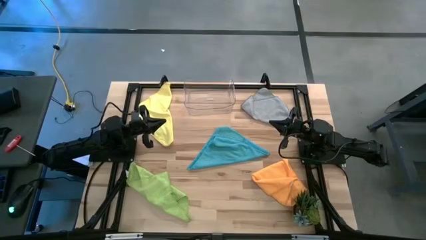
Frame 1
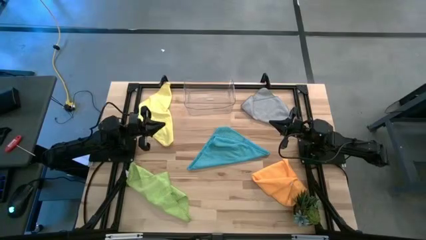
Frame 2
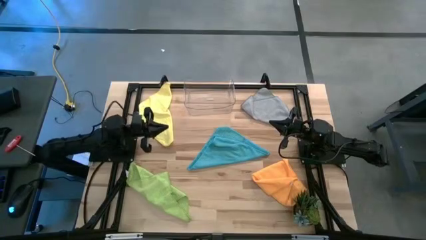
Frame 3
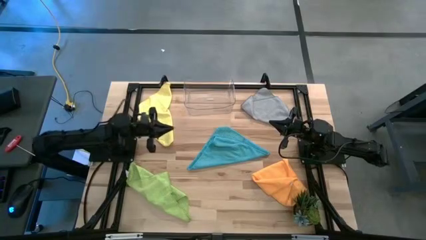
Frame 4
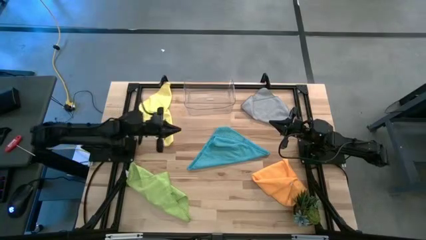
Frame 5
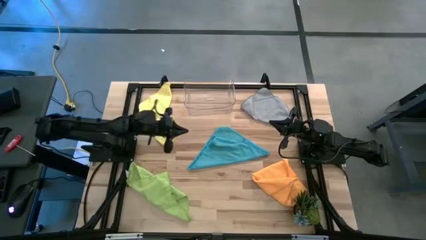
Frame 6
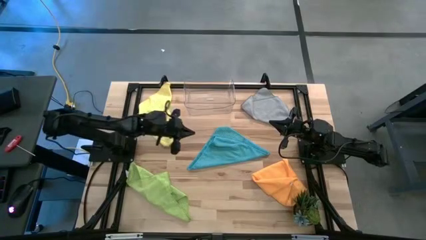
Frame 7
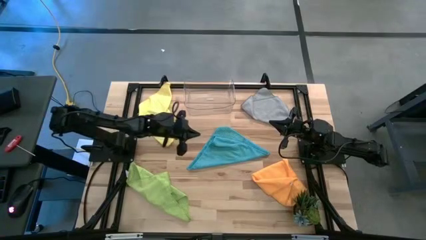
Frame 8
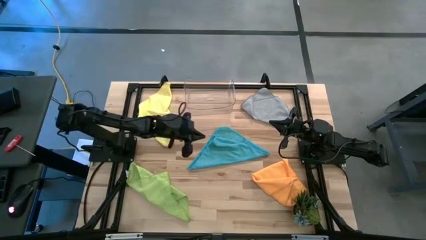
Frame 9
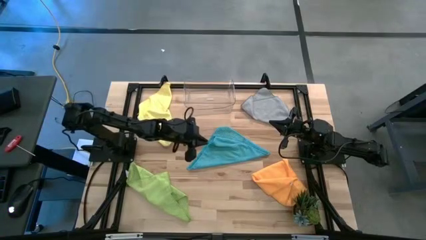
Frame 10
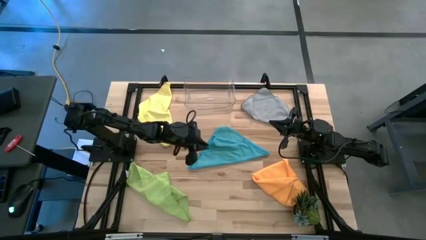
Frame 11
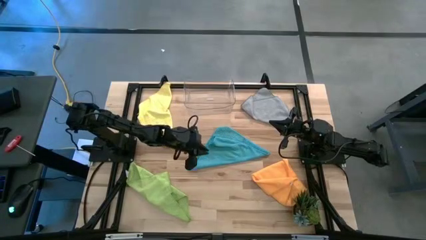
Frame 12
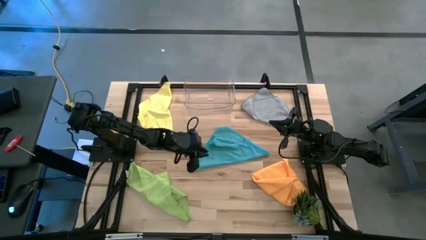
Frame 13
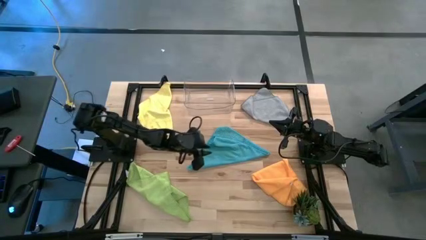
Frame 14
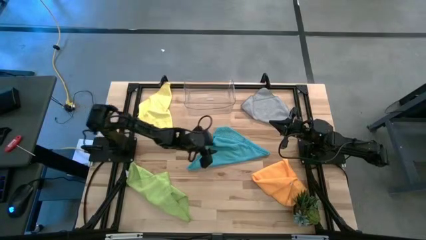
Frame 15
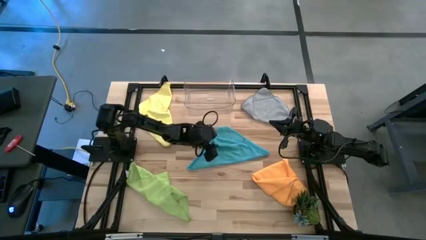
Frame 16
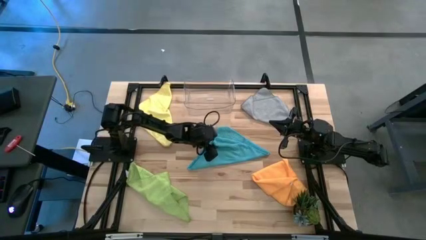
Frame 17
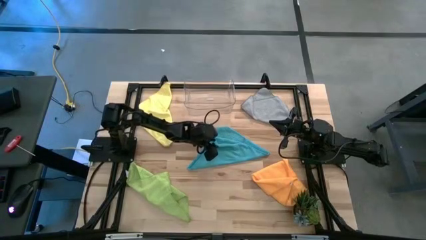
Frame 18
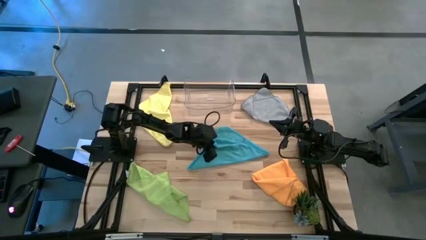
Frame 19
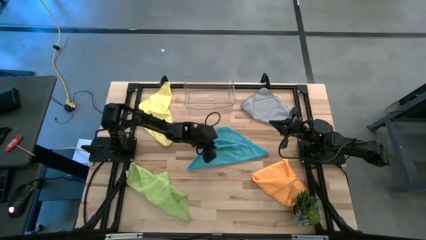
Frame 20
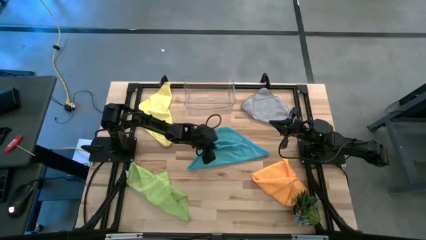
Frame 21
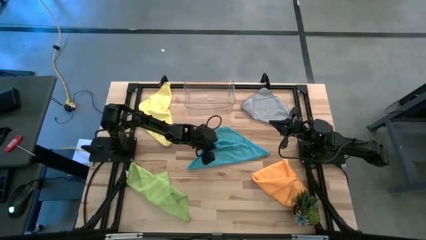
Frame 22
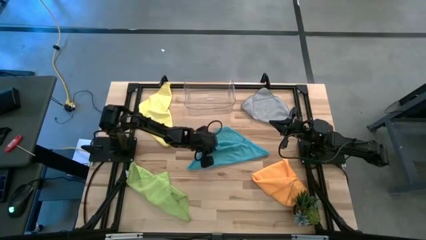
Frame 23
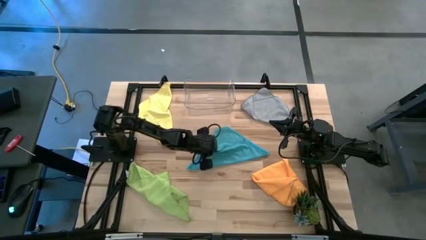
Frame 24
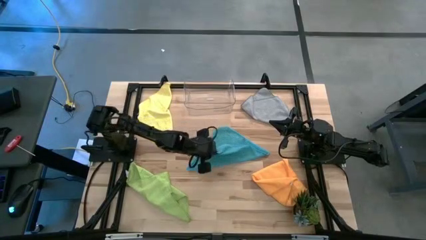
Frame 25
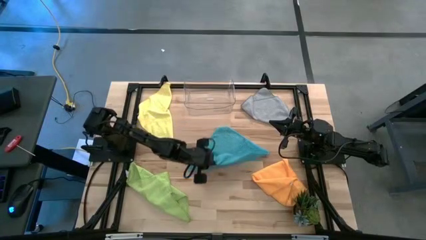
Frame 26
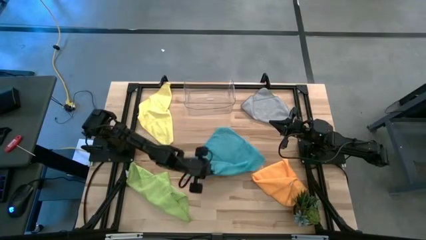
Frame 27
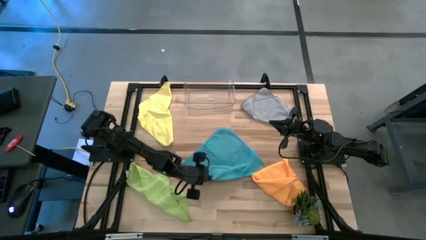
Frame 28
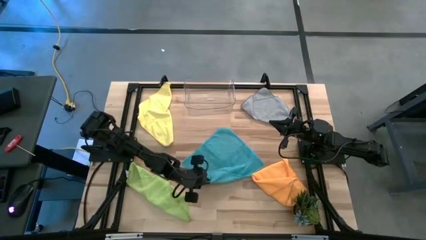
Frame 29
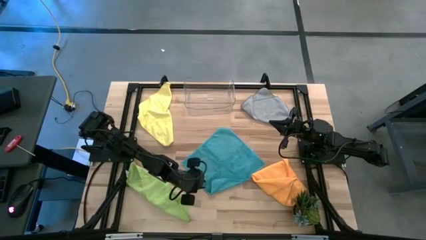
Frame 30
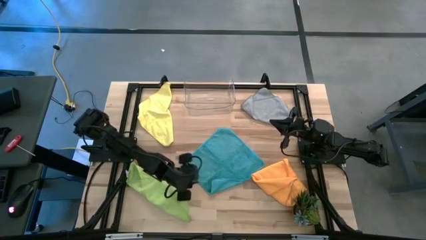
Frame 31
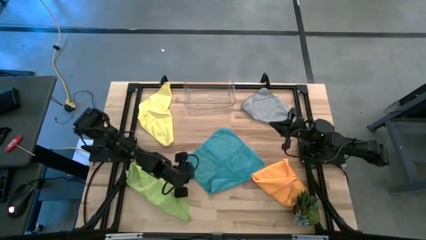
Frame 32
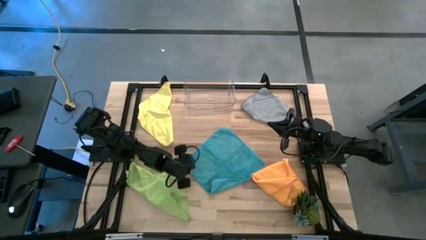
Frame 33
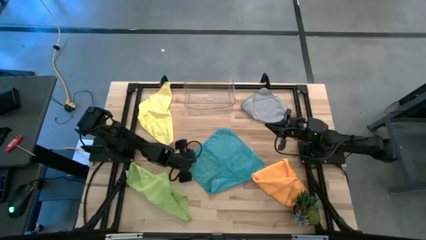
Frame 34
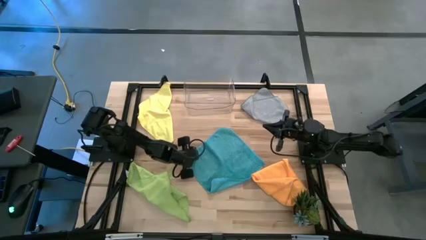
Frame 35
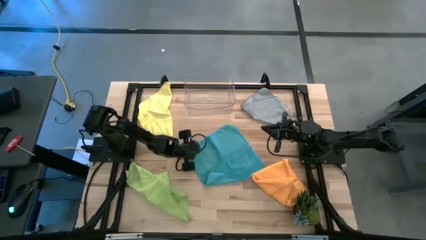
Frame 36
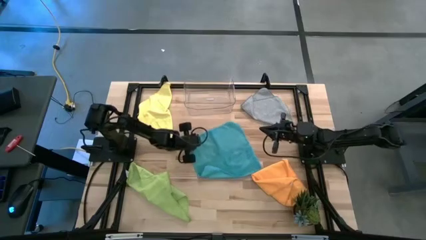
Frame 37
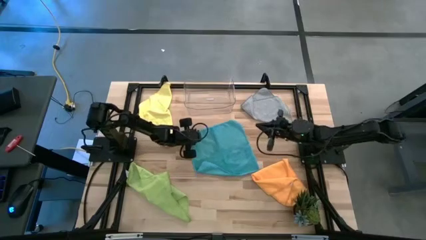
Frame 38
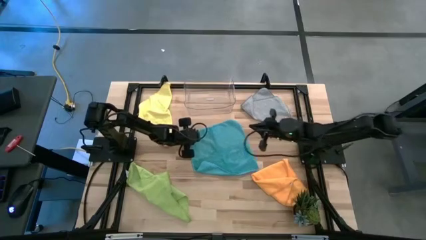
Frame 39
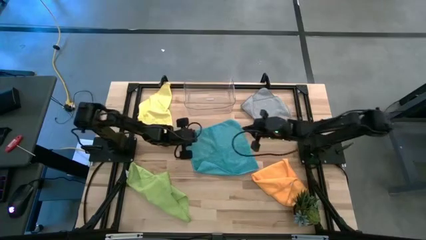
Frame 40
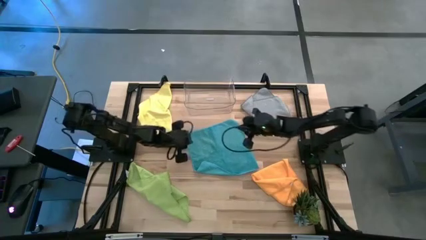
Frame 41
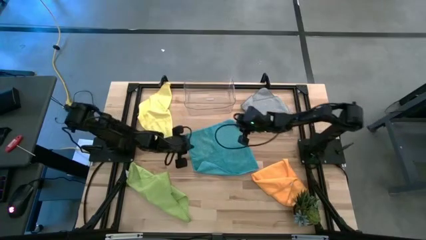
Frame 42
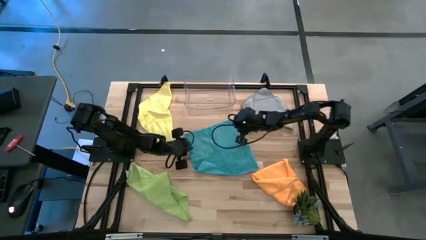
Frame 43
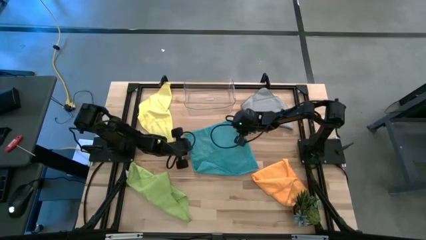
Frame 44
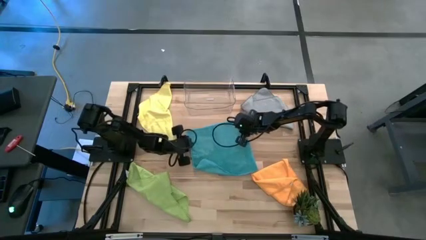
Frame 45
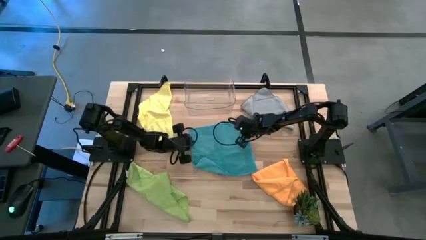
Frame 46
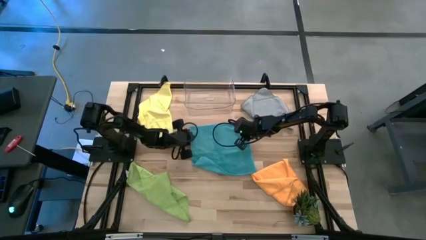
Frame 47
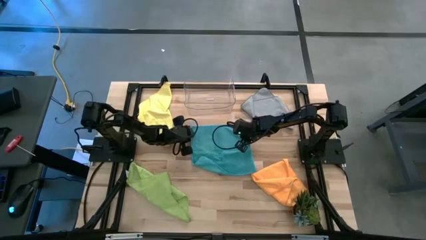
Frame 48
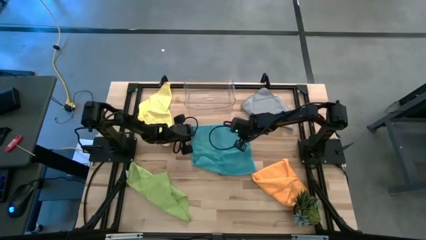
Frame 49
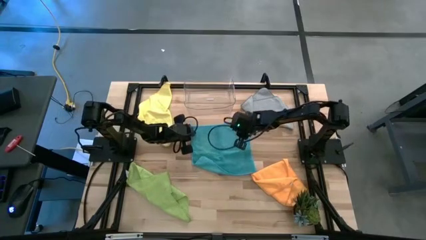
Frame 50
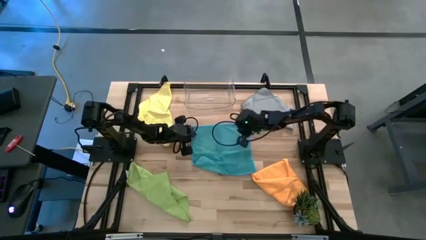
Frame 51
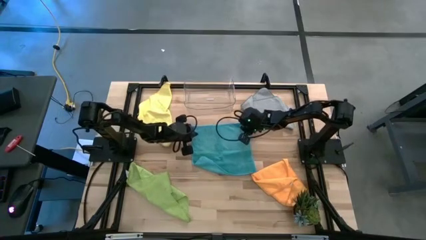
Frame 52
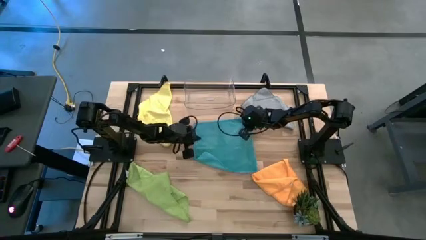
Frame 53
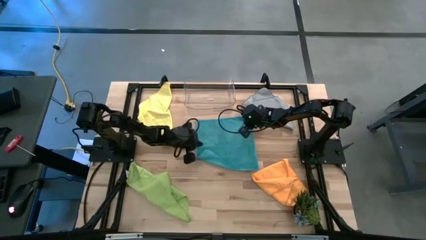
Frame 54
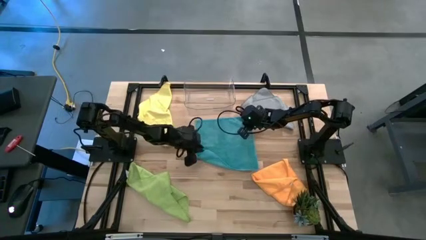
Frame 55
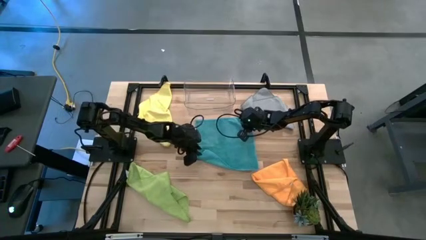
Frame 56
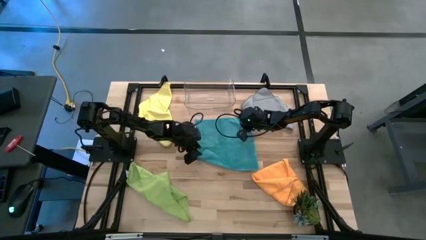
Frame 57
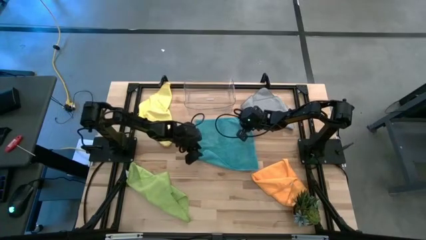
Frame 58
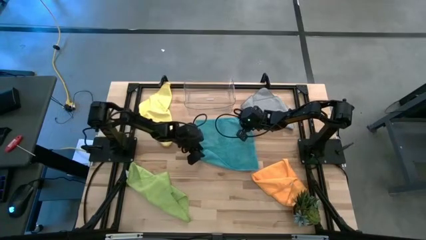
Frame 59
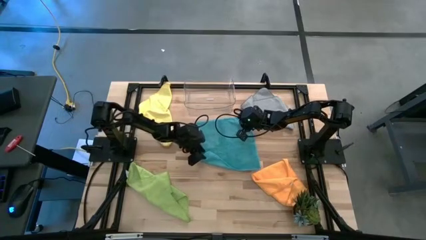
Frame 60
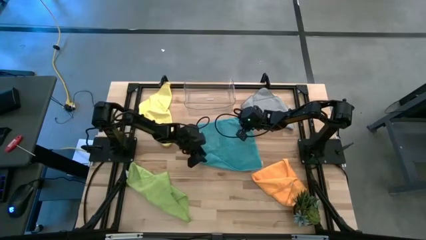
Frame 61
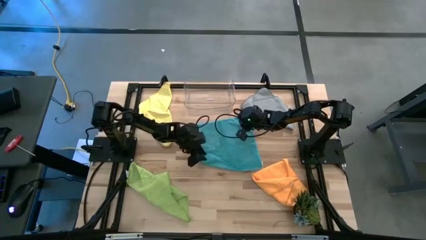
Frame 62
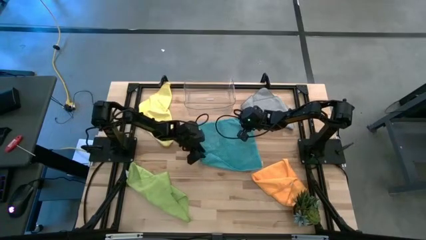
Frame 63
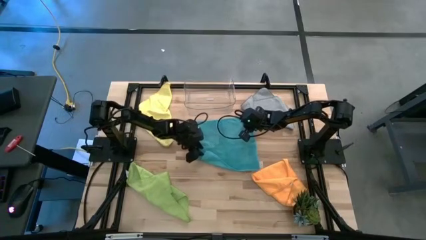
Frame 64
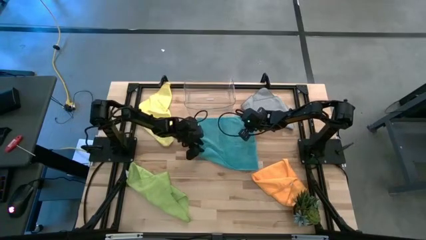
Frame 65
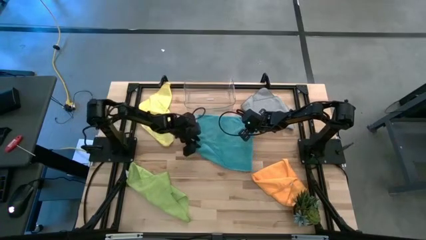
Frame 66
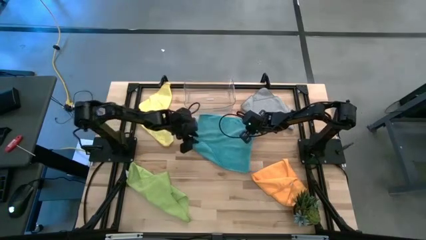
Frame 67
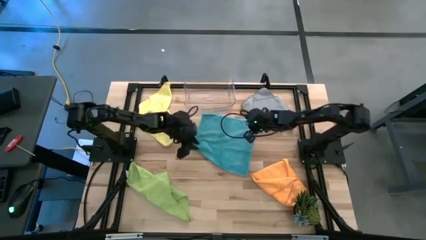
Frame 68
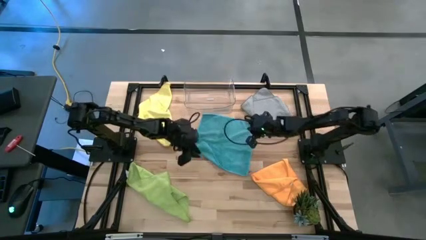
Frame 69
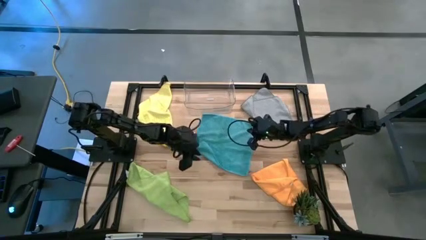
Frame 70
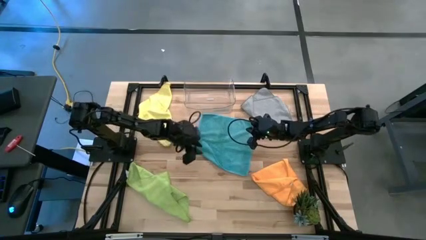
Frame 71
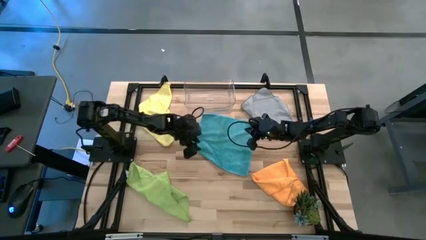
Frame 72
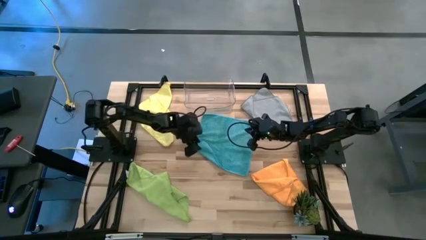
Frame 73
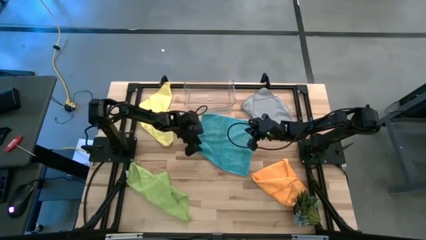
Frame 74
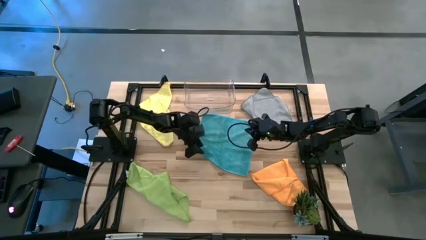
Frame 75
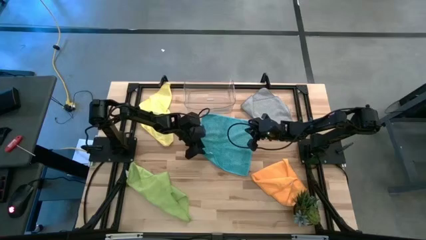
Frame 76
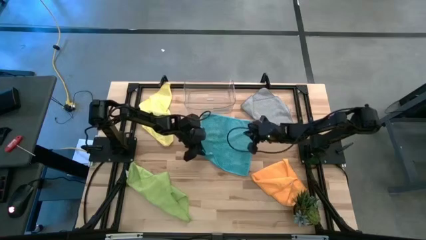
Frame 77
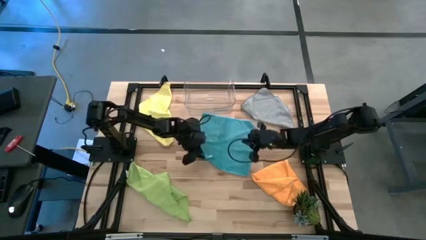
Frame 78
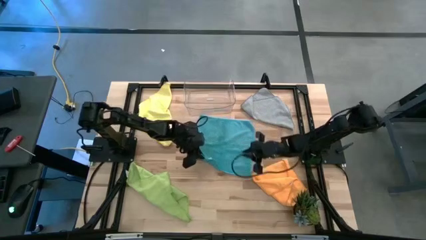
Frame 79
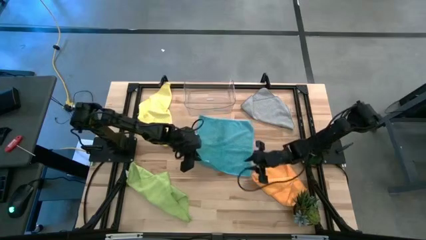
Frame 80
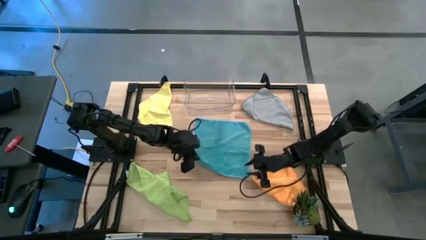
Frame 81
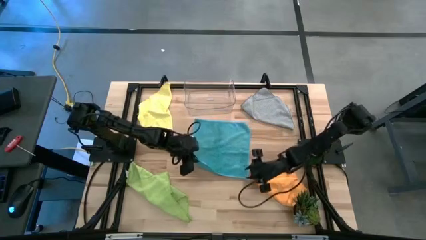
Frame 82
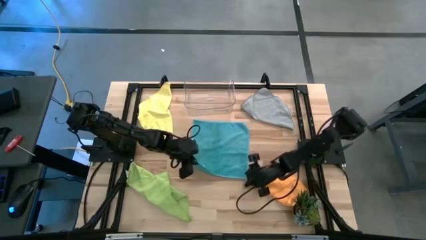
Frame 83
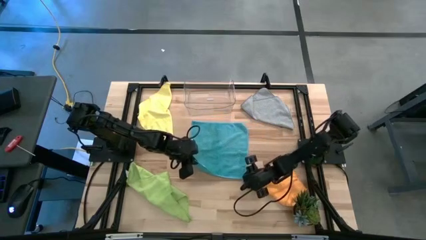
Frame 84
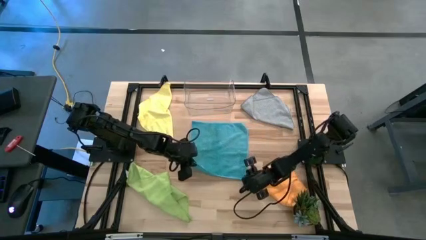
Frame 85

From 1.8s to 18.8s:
Task: Fold microfiber towels
Fold the blue towel
